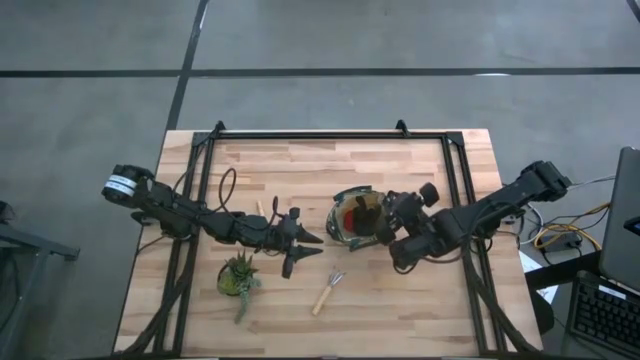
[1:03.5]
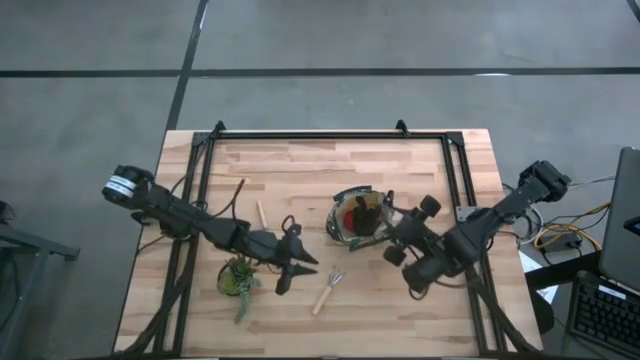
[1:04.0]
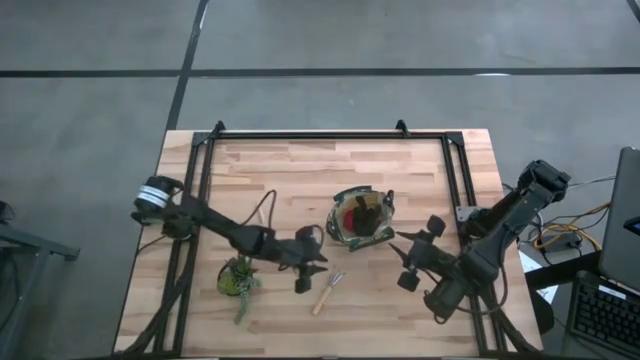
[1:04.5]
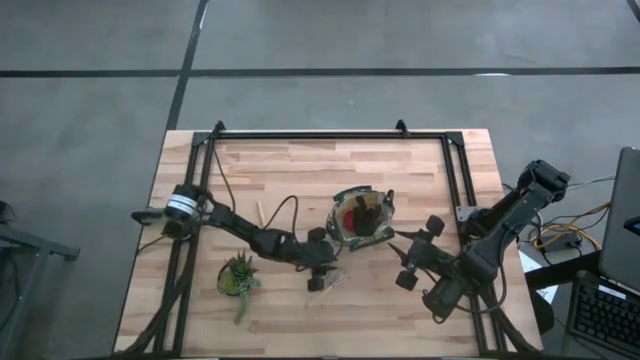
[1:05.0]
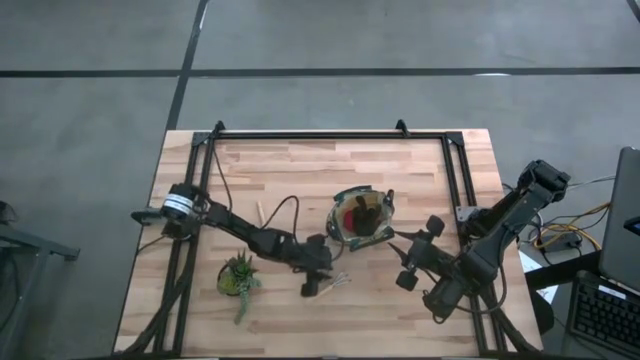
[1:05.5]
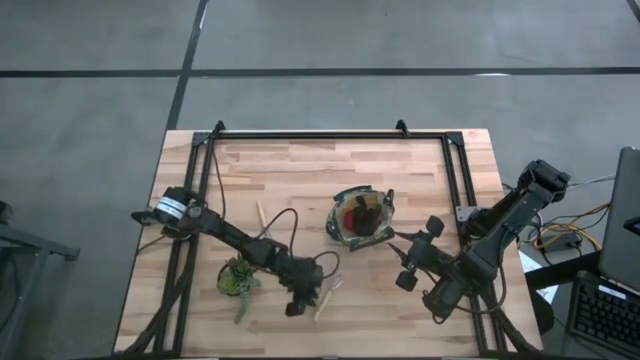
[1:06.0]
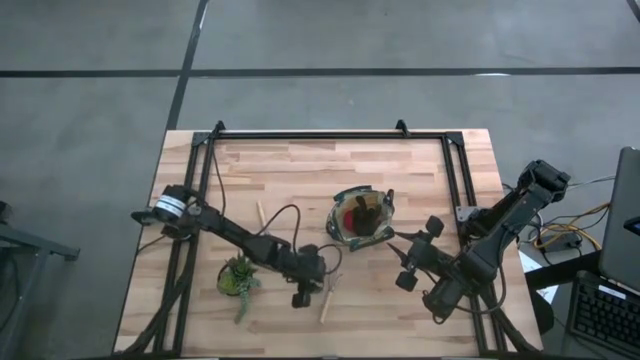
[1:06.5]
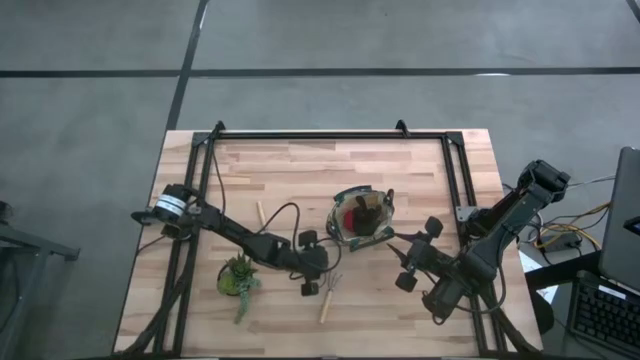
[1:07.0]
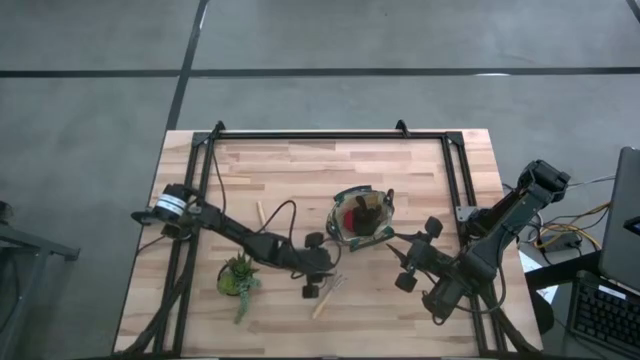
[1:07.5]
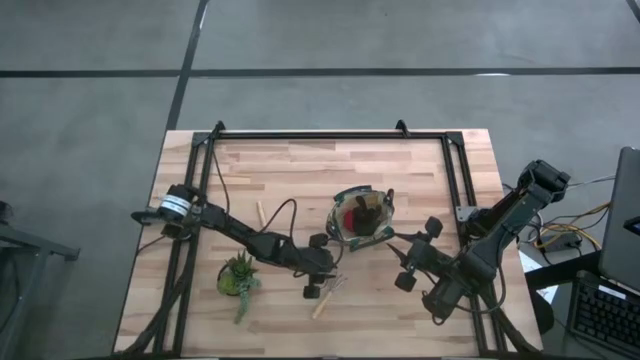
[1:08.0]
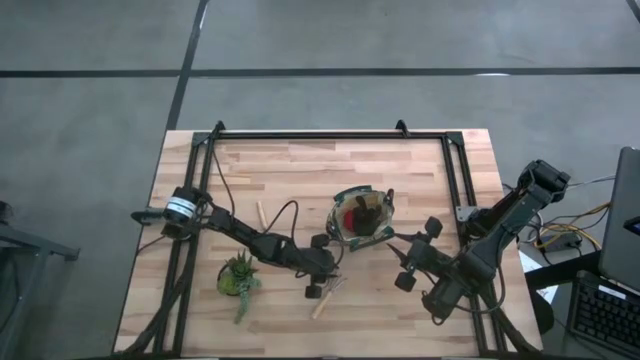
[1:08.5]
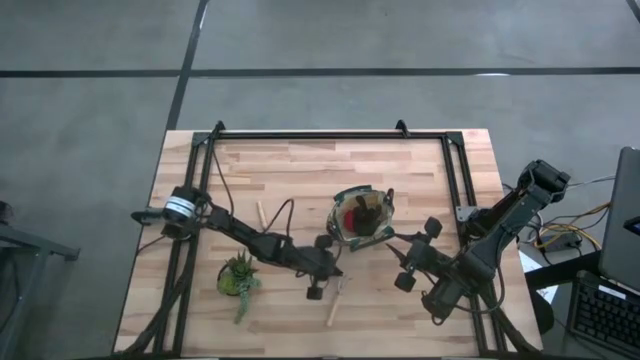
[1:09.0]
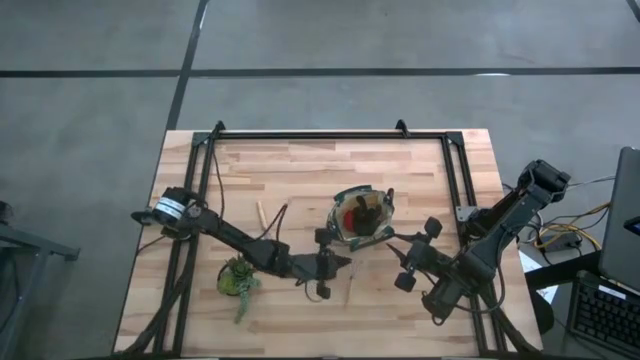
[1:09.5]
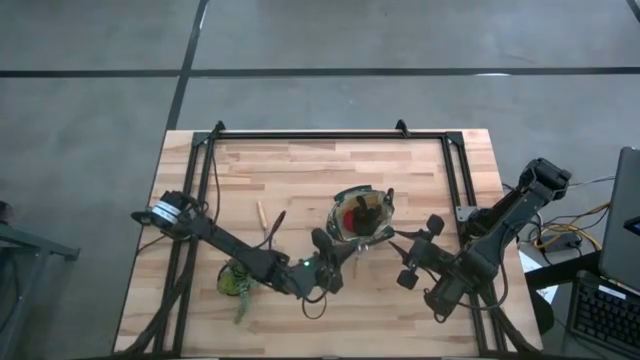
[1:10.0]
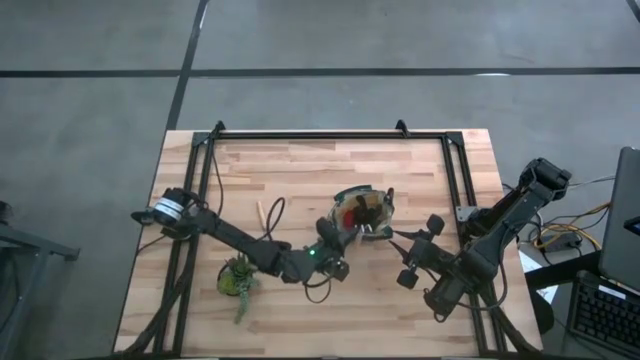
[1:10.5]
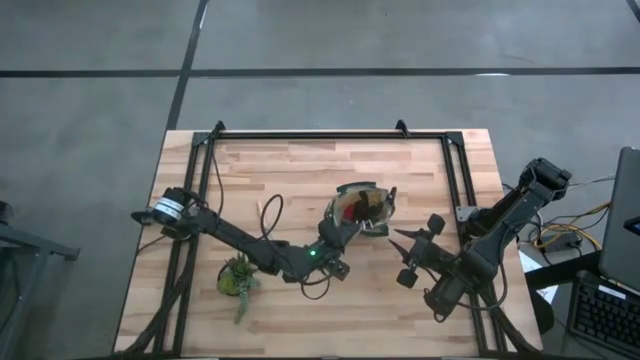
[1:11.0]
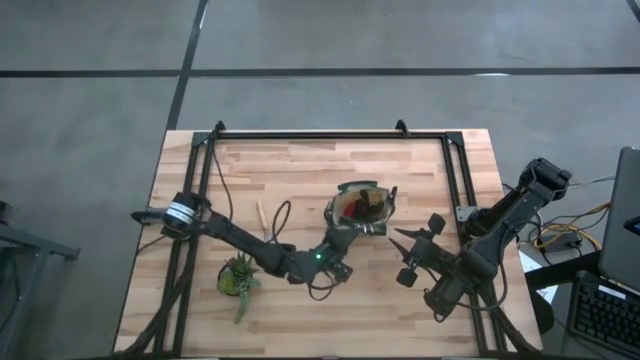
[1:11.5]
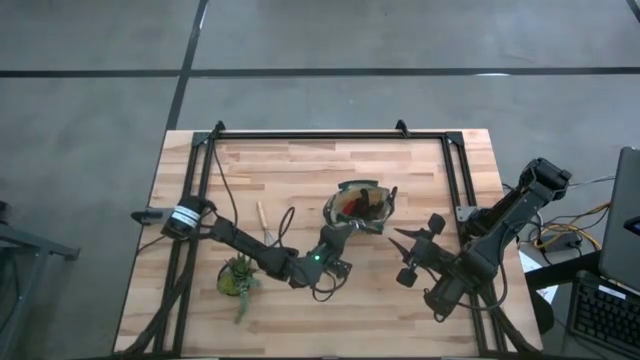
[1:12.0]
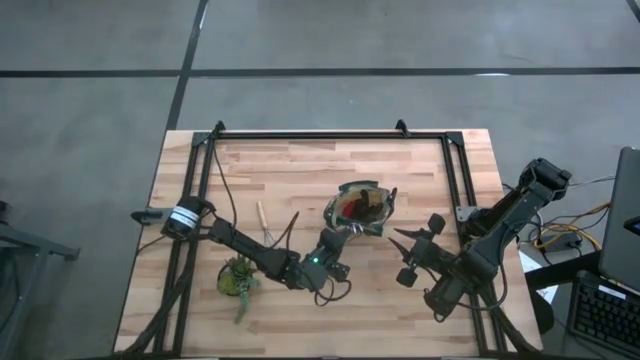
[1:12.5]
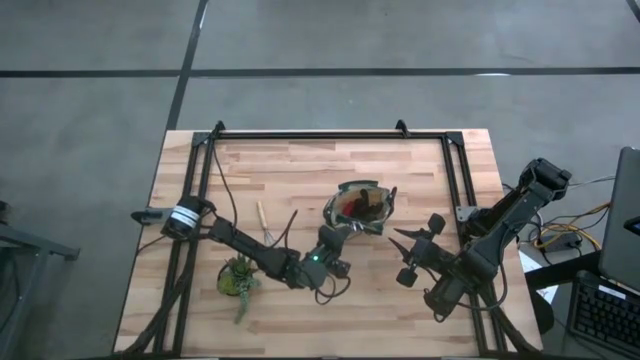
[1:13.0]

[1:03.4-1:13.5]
Task: Pick & Place Garden tools in Gardening bag
Put the bottom brown hand rake into the green gardening bag

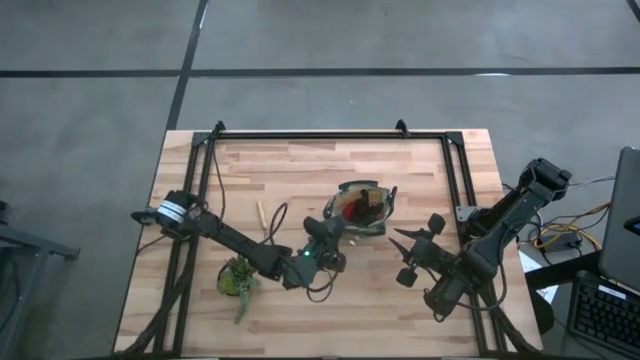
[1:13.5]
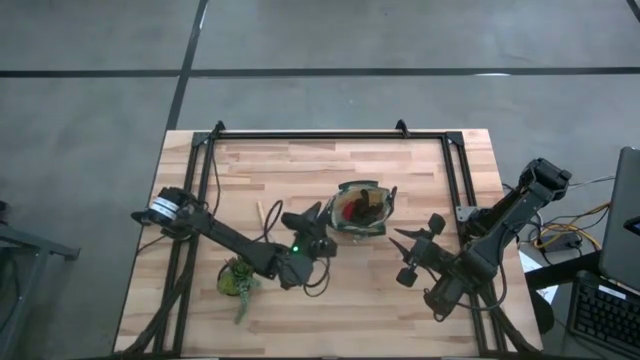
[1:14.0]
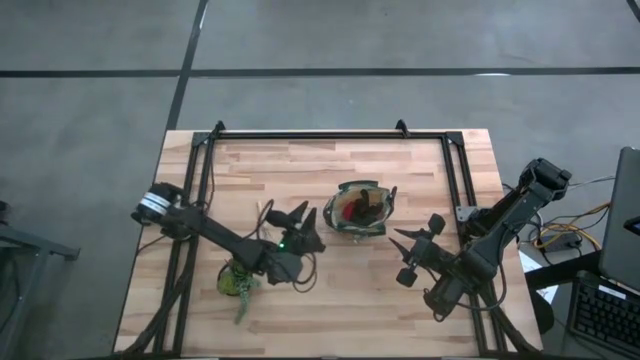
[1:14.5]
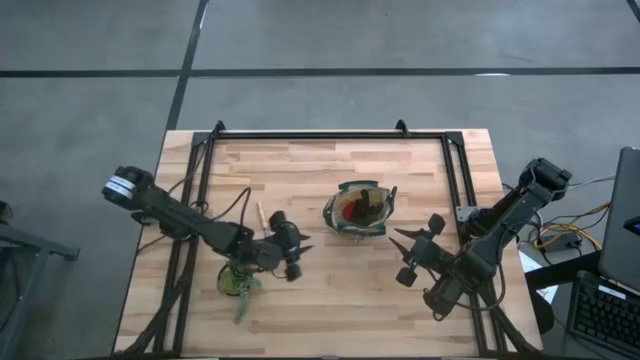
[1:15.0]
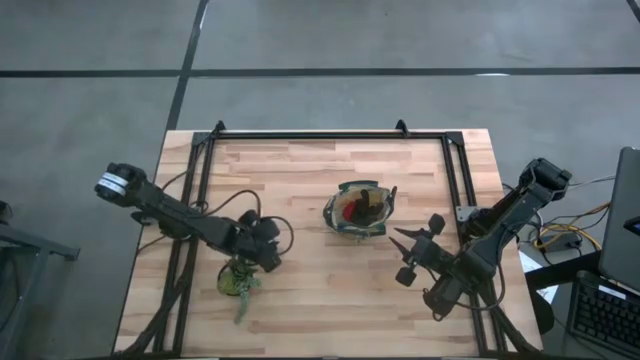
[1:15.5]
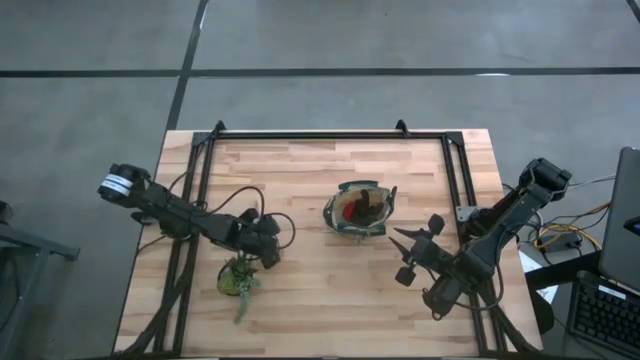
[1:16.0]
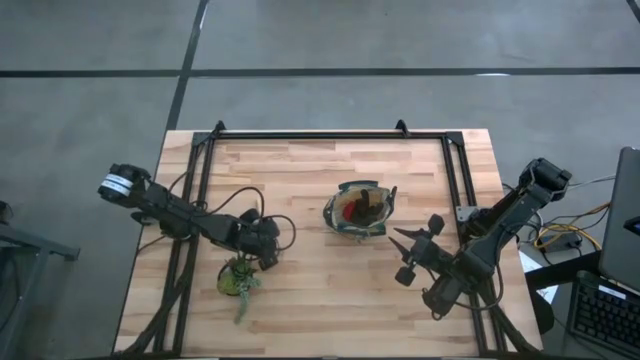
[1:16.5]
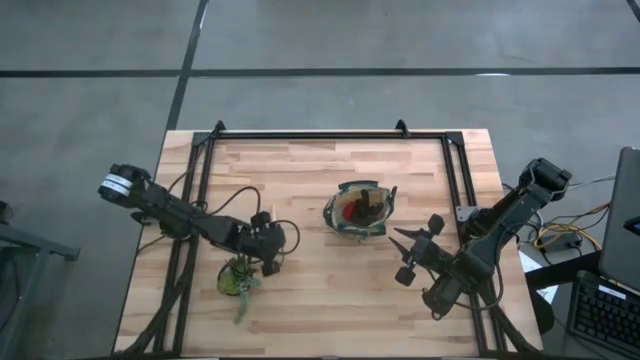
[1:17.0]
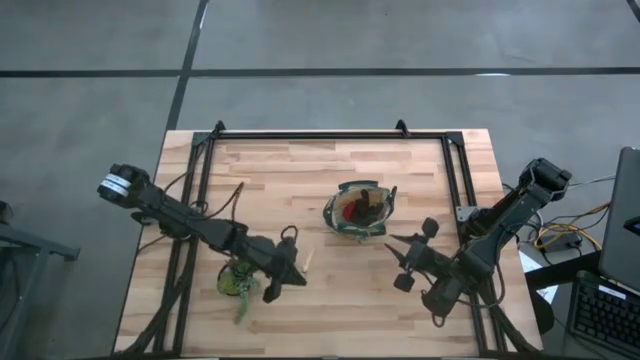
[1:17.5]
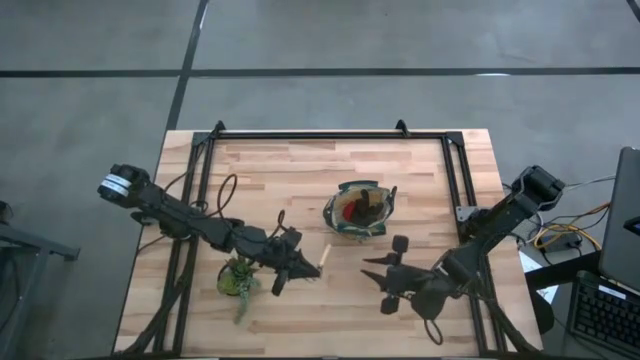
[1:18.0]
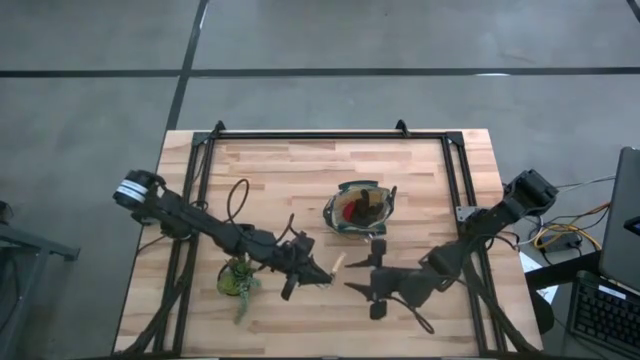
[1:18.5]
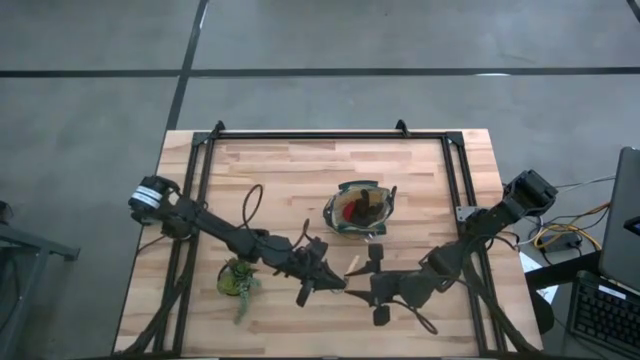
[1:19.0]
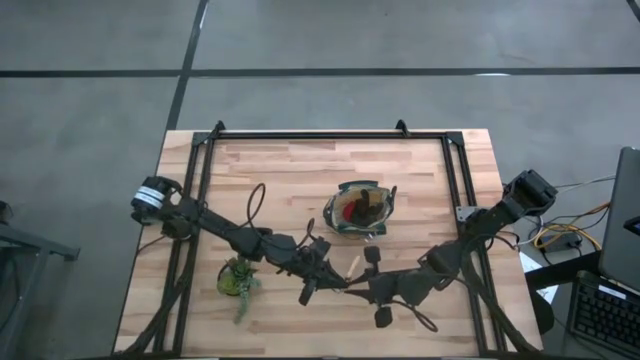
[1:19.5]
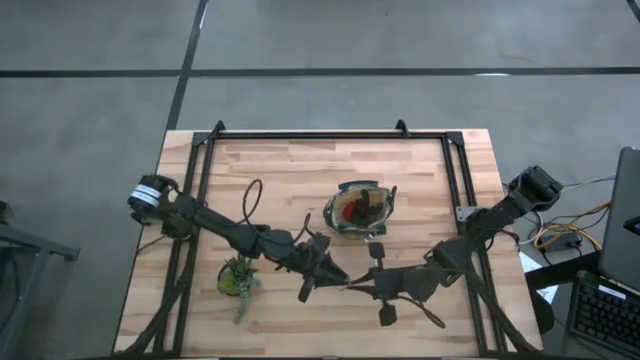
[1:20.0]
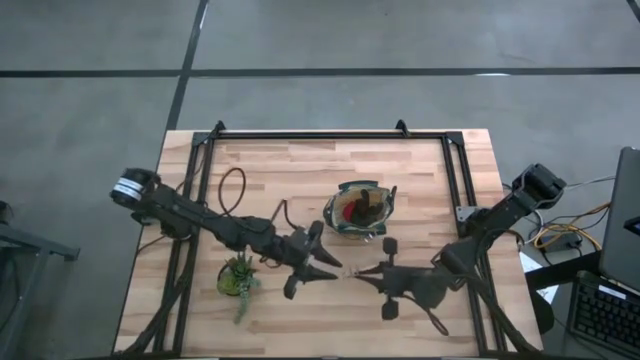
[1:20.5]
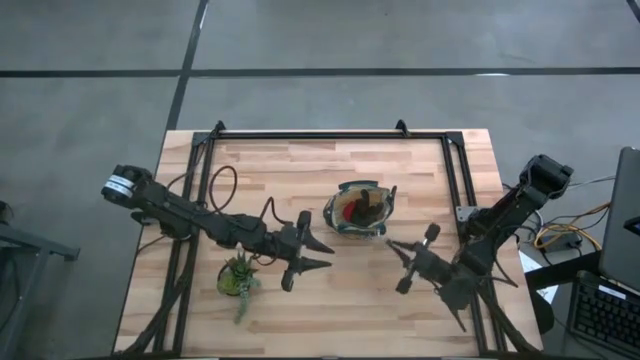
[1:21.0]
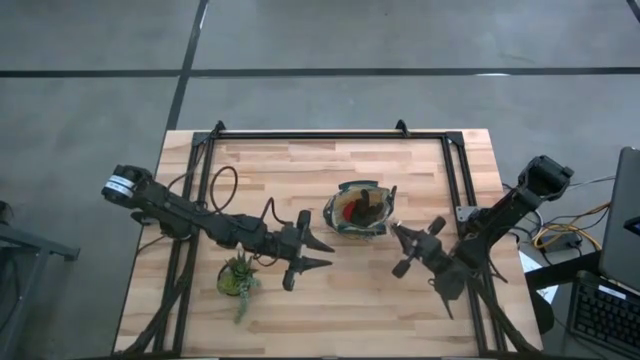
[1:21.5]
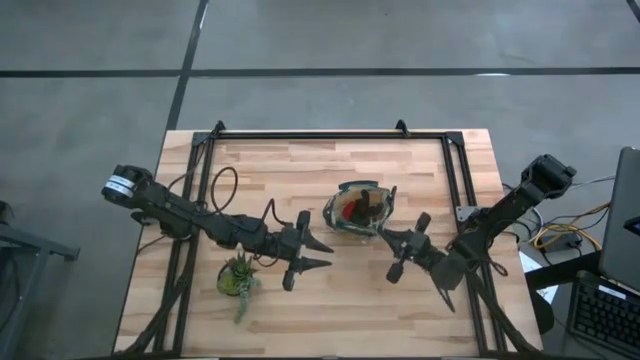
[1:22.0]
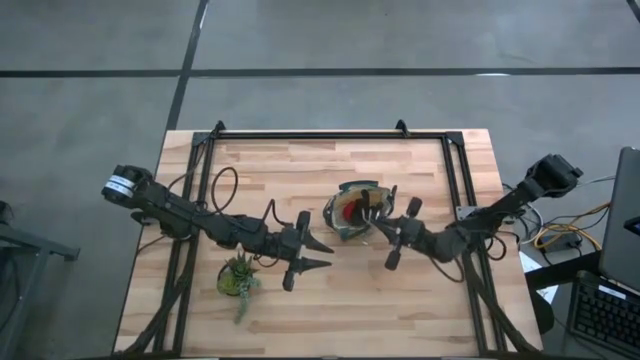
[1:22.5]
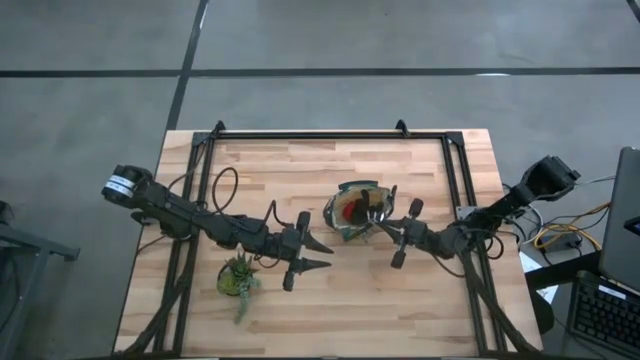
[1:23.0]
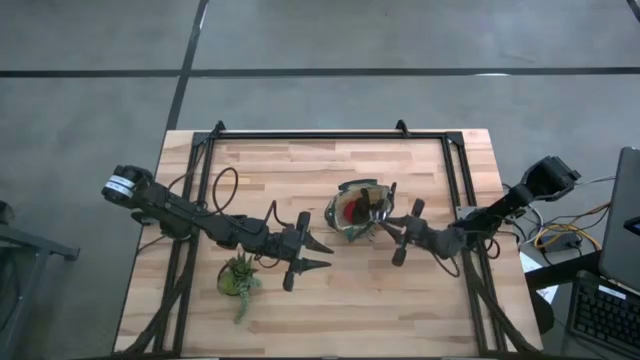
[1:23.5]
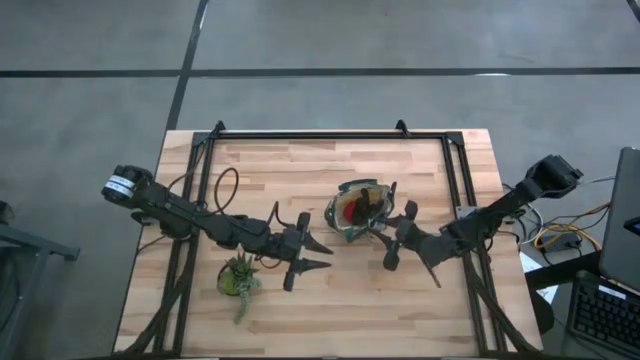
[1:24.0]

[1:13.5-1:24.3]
Put the brown hand rake into the green gardening bag
